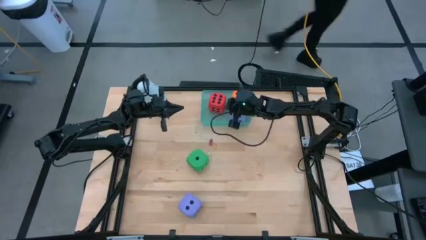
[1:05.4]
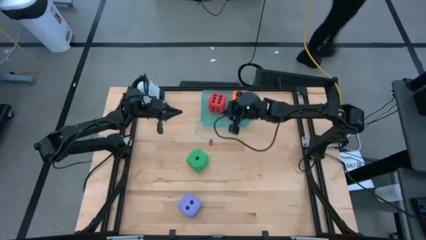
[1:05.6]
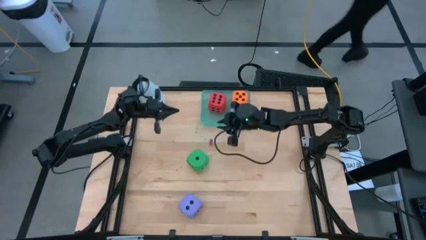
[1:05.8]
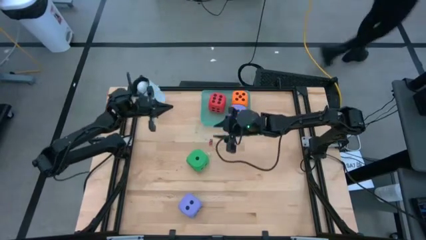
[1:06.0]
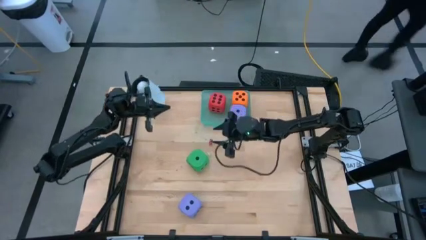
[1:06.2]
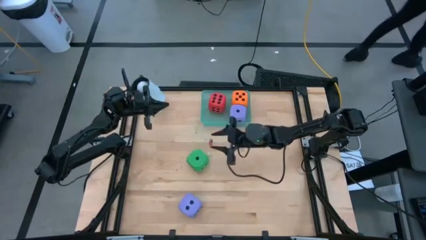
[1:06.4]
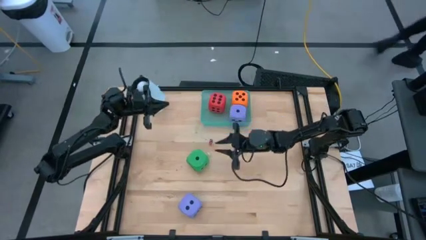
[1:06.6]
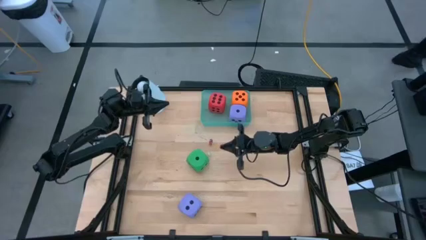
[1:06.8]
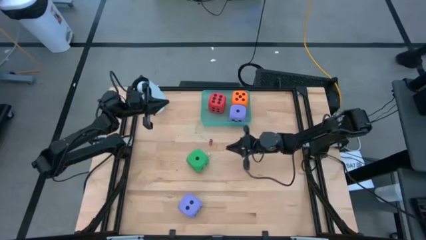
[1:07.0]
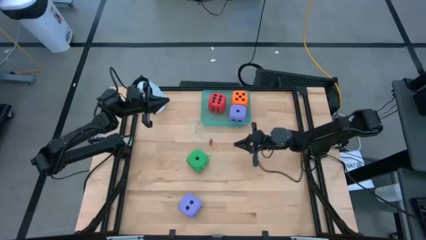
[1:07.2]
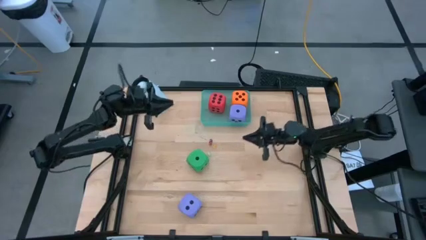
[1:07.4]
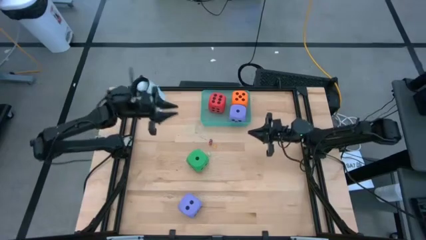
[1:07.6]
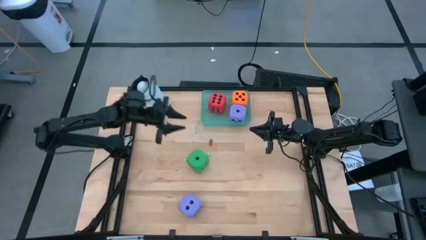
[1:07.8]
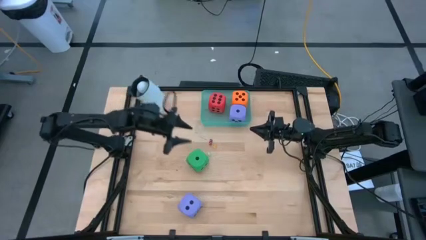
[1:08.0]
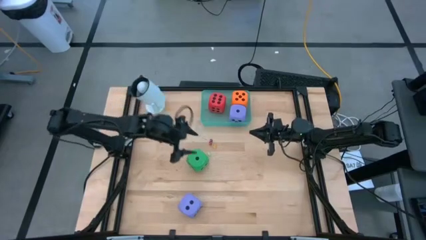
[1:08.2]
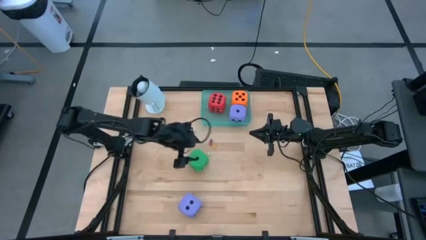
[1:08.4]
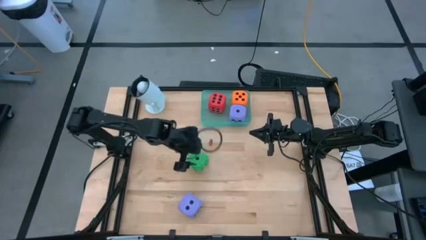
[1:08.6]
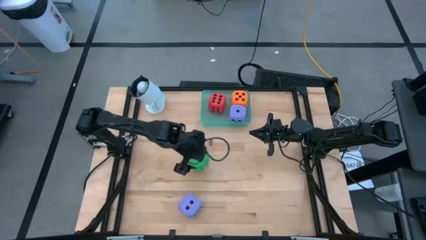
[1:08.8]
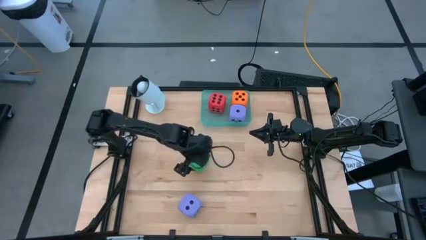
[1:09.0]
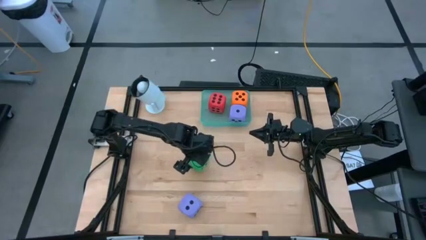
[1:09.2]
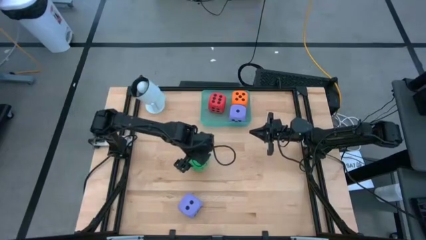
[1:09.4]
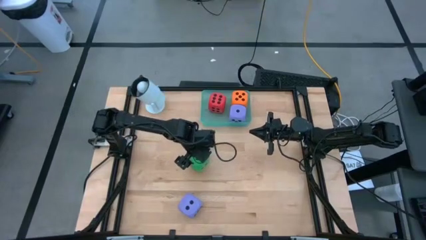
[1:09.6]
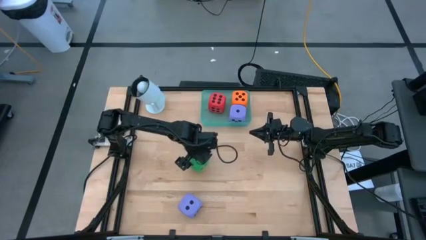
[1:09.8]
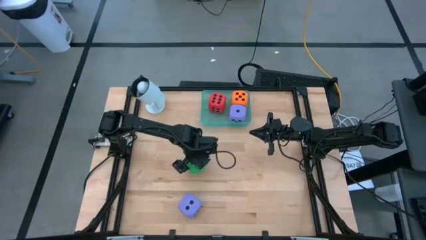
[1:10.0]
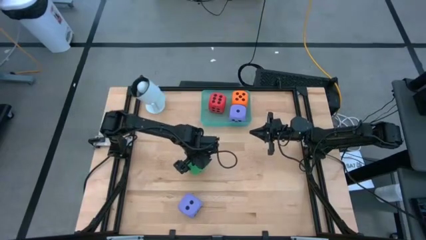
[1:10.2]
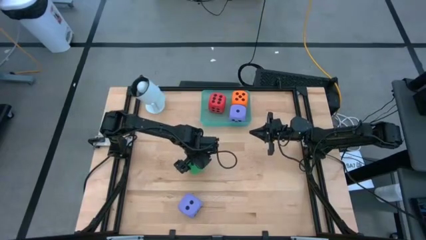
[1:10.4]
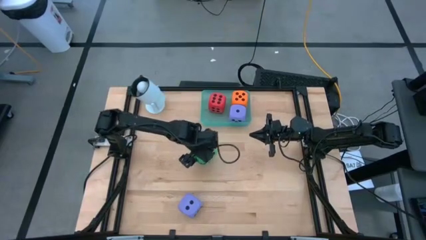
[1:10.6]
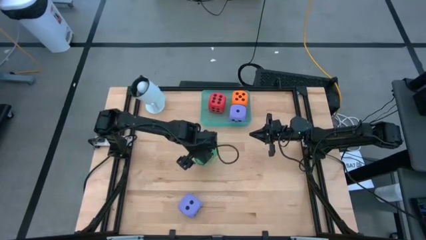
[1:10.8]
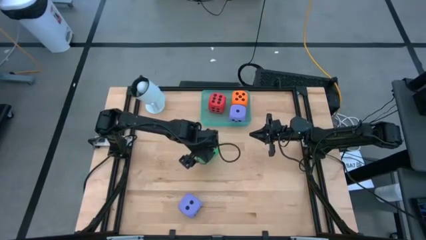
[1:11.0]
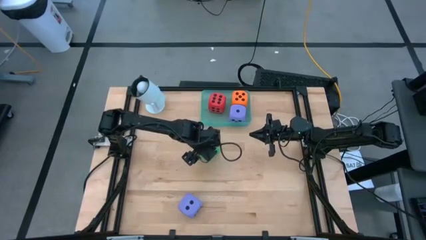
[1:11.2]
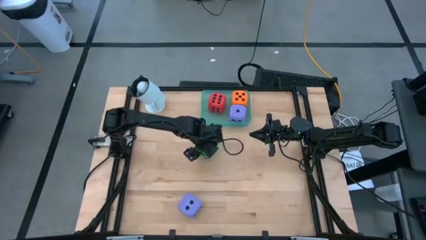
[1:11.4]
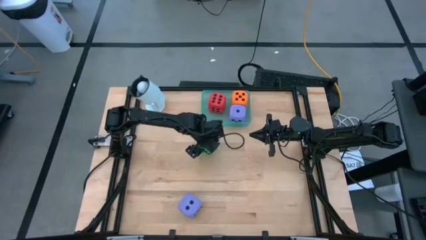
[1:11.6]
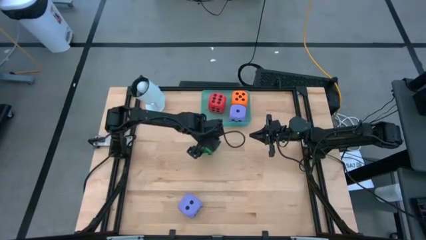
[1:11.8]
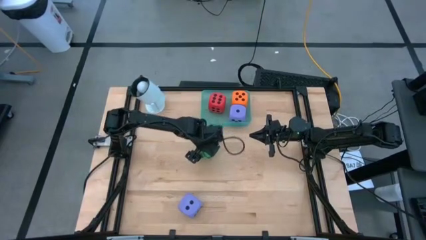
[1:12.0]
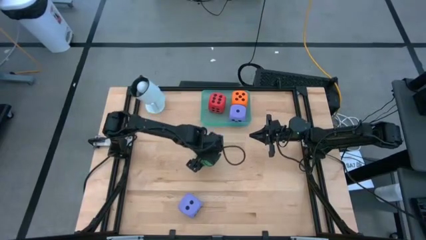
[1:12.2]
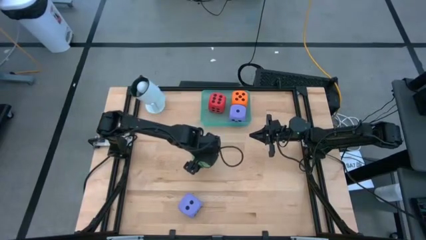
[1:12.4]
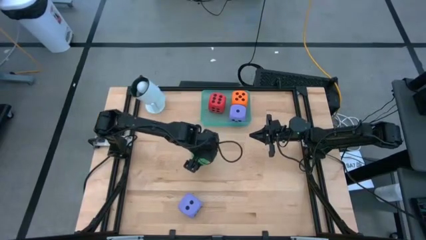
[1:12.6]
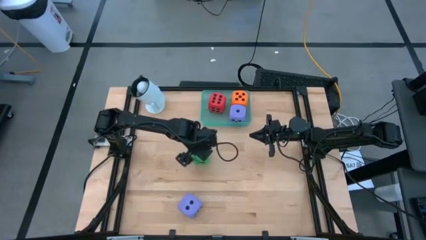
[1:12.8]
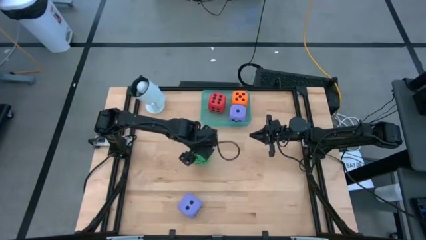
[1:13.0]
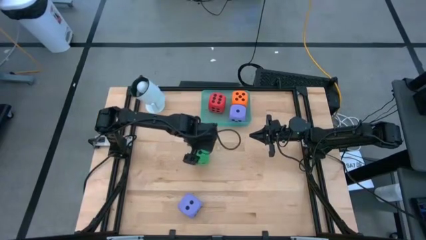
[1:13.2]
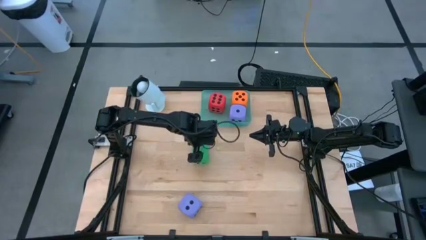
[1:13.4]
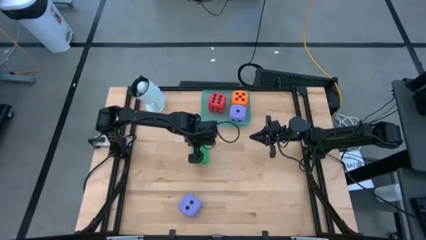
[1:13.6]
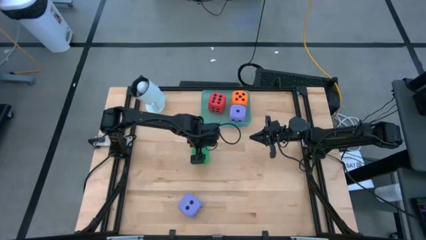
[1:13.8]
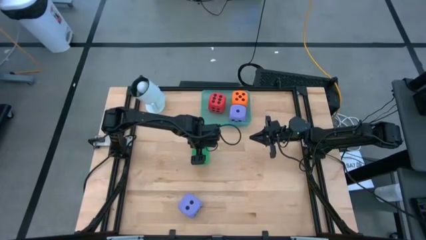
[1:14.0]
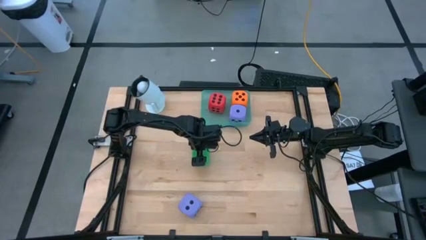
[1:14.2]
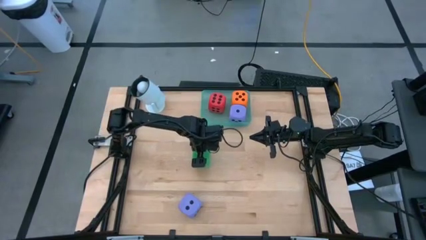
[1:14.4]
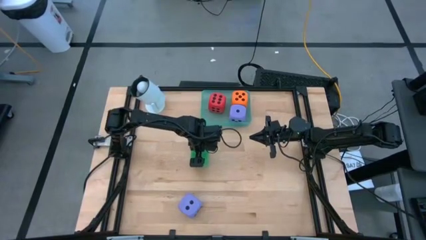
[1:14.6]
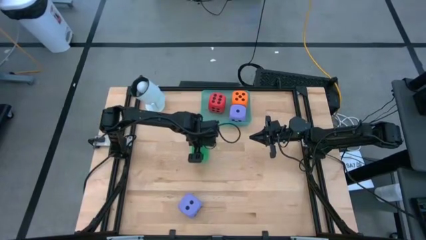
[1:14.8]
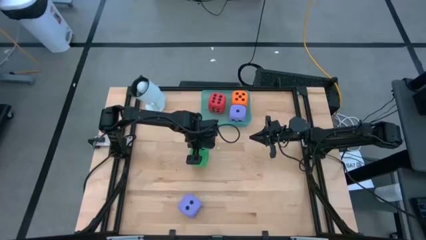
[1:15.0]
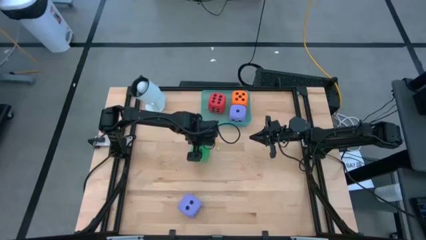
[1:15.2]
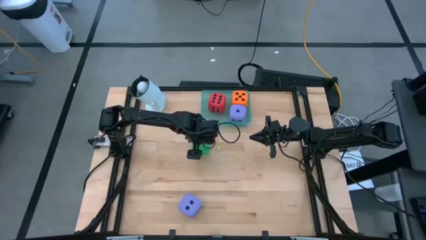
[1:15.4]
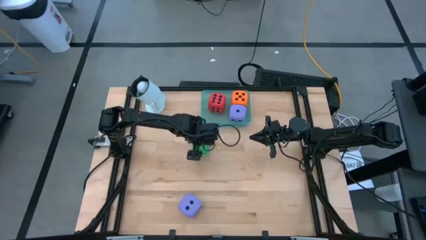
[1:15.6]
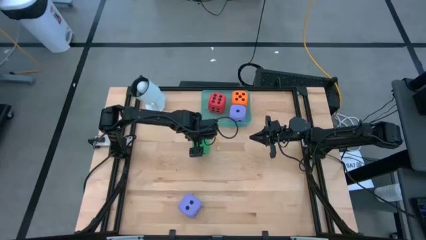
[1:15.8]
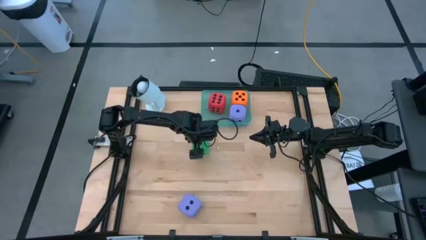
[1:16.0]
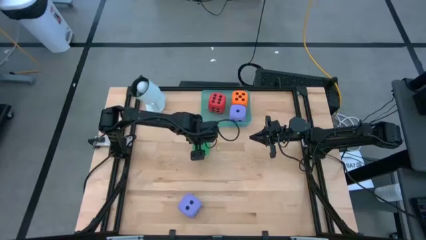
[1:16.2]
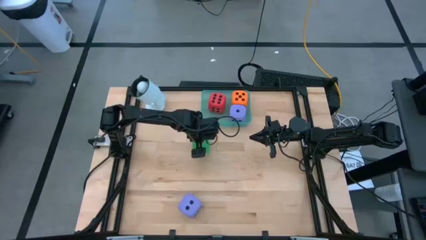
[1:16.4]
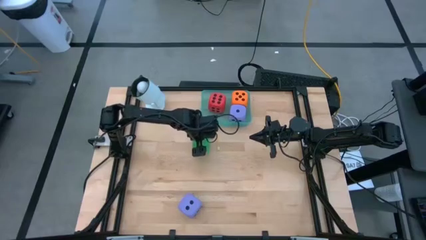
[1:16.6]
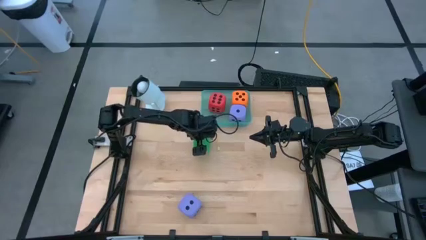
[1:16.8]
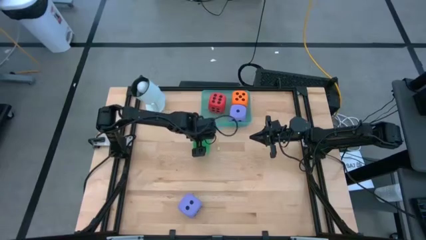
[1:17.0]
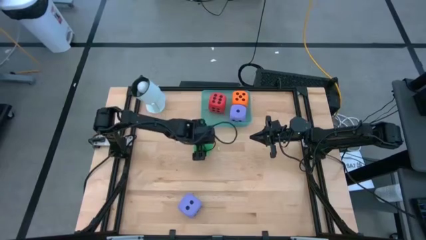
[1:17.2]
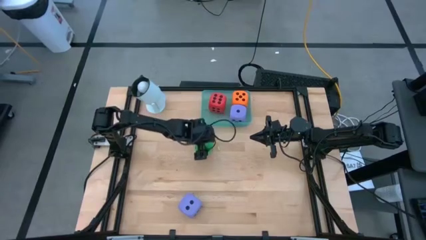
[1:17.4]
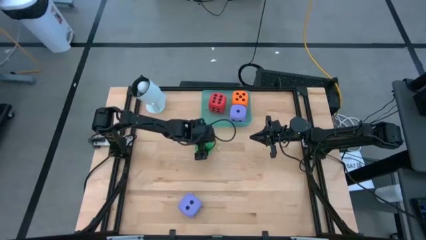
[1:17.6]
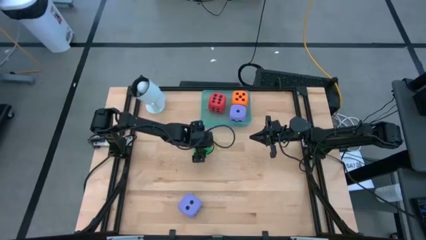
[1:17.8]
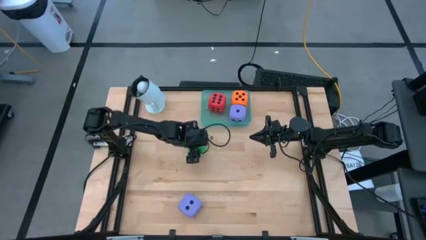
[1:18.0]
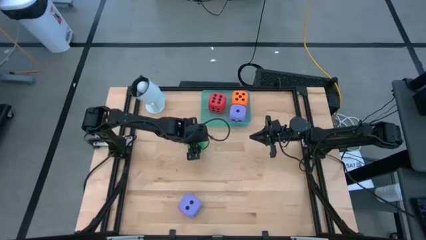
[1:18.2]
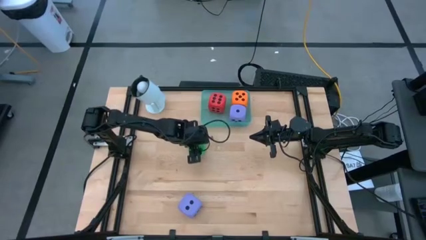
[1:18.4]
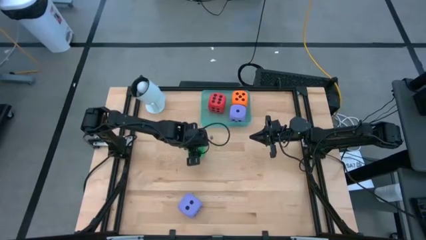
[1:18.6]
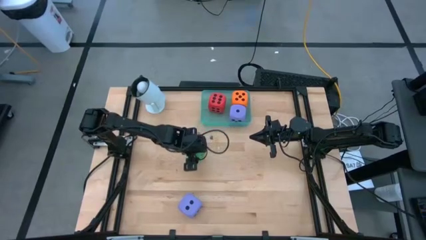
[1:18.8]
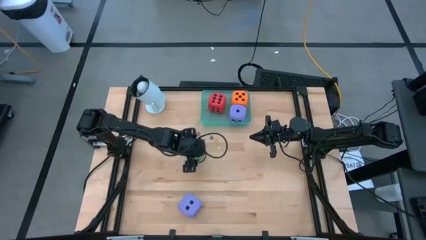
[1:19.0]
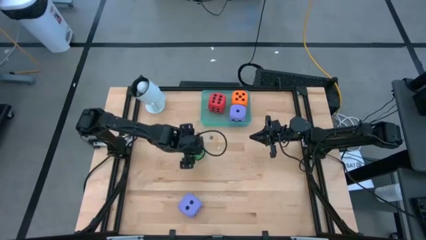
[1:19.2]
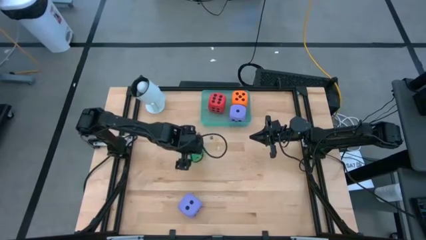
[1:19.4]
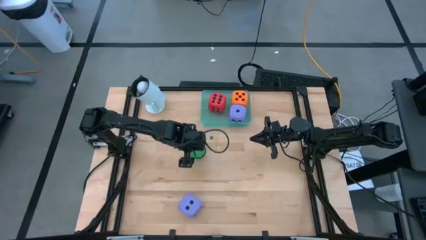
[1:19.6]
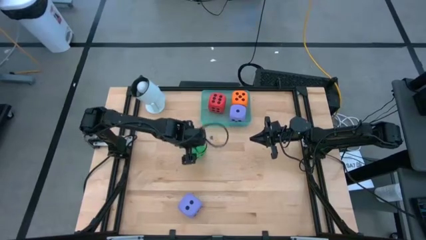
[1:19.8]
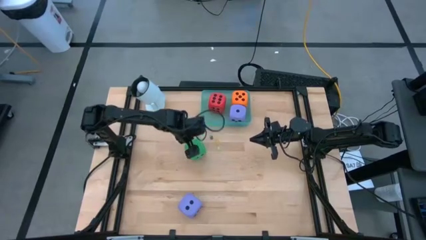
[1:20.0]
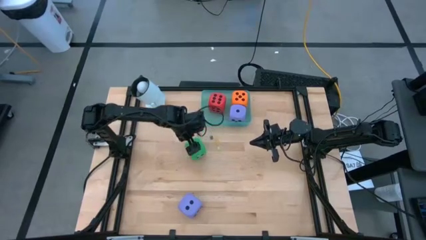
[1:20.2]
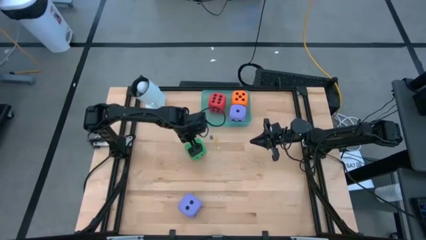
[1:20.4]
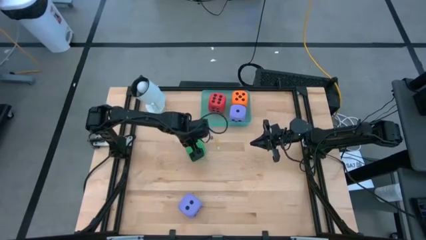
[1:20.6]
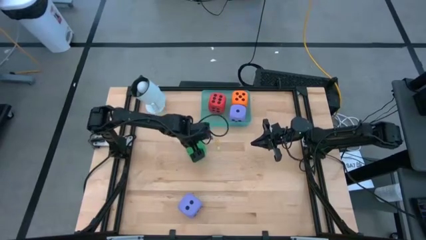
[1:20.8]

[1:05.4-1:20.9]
Task: Pick & Place Dice
Put the big green dice into the bin
